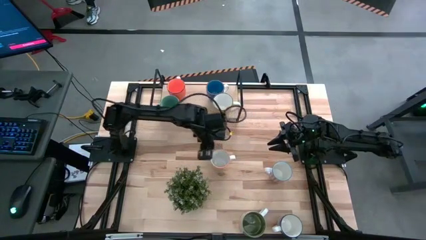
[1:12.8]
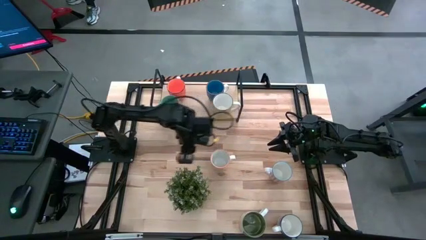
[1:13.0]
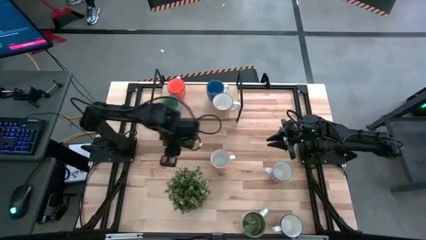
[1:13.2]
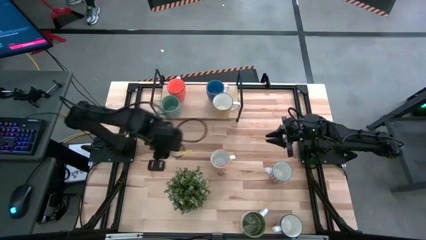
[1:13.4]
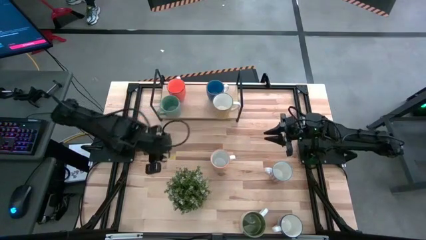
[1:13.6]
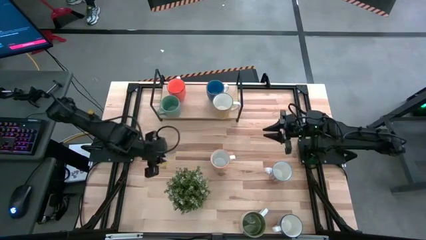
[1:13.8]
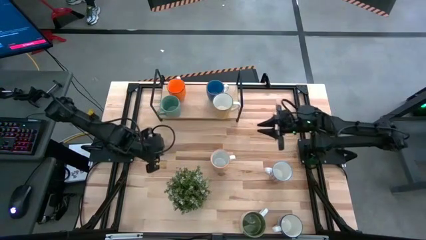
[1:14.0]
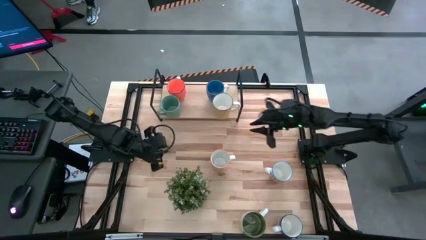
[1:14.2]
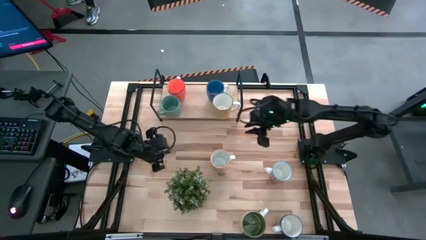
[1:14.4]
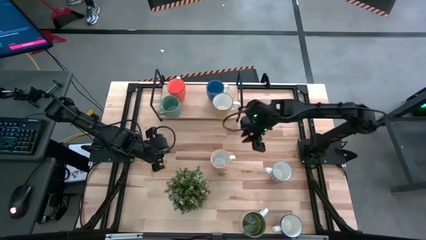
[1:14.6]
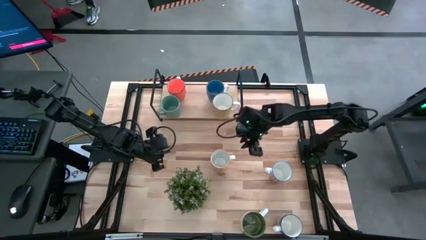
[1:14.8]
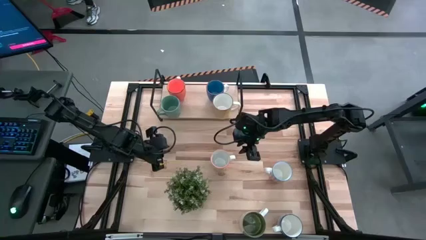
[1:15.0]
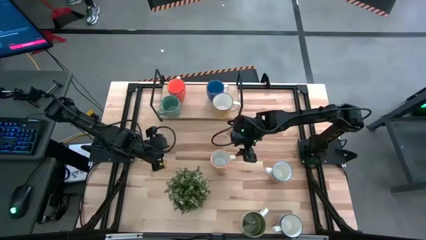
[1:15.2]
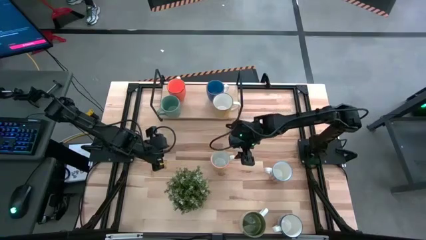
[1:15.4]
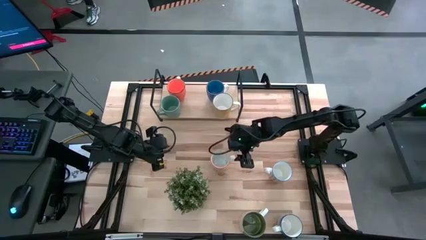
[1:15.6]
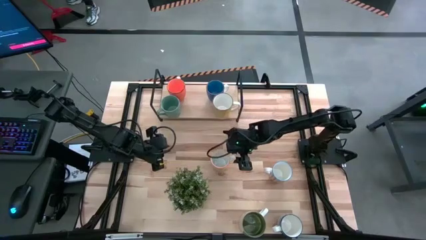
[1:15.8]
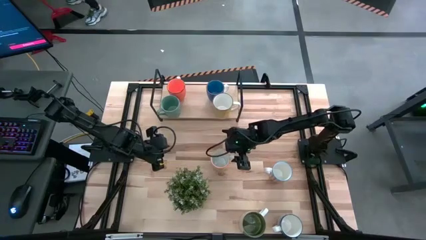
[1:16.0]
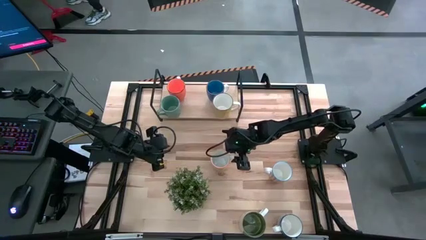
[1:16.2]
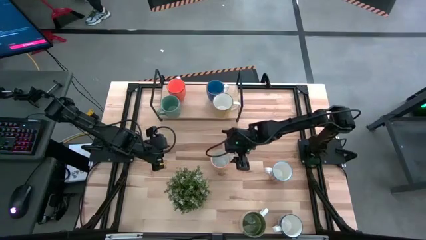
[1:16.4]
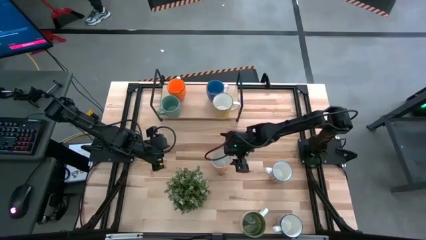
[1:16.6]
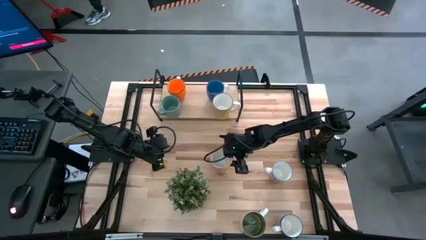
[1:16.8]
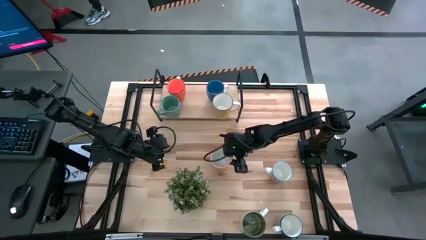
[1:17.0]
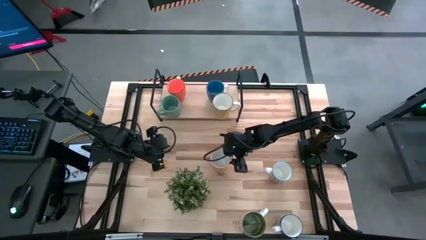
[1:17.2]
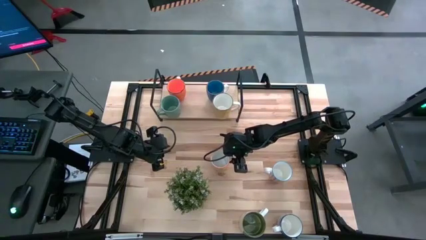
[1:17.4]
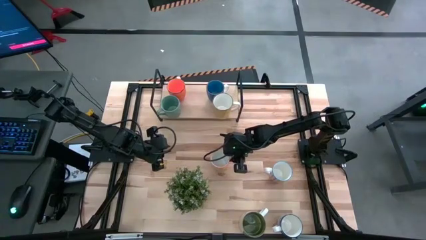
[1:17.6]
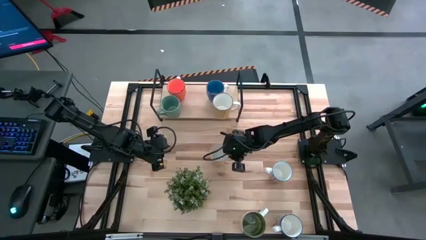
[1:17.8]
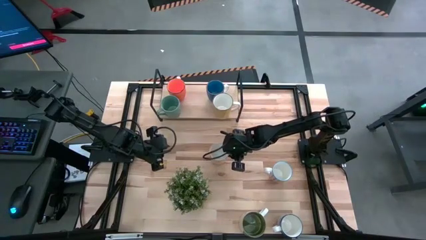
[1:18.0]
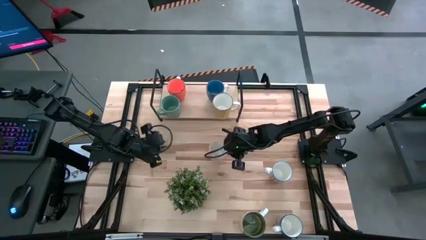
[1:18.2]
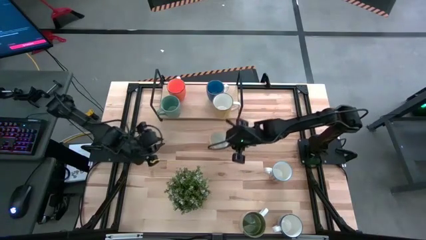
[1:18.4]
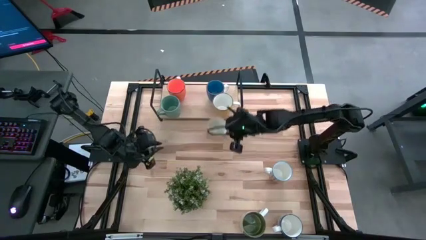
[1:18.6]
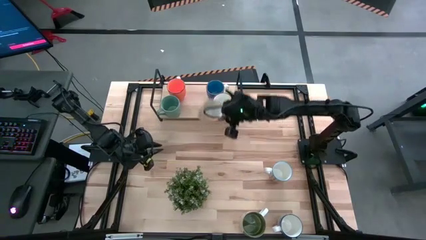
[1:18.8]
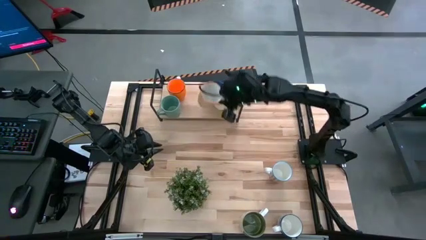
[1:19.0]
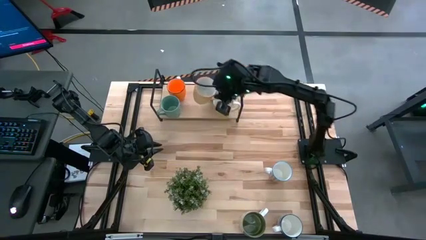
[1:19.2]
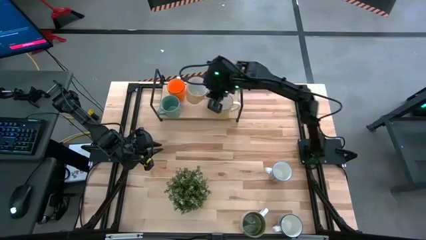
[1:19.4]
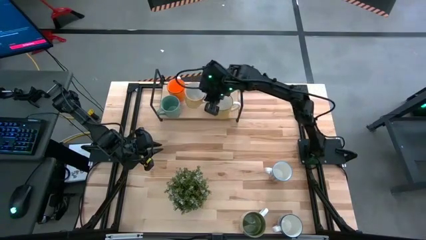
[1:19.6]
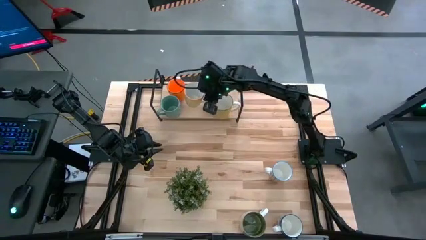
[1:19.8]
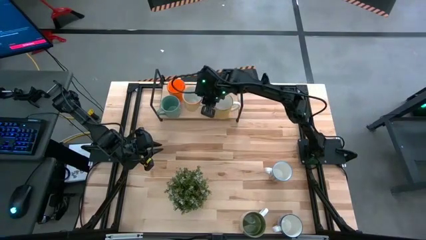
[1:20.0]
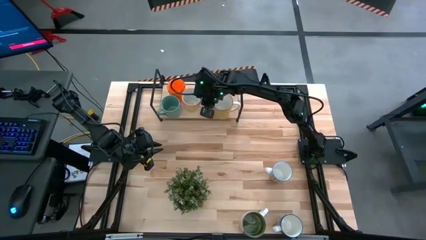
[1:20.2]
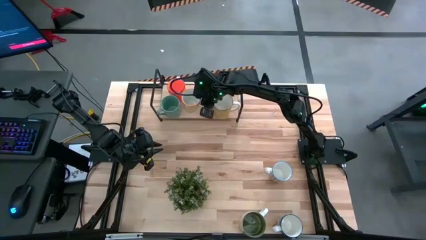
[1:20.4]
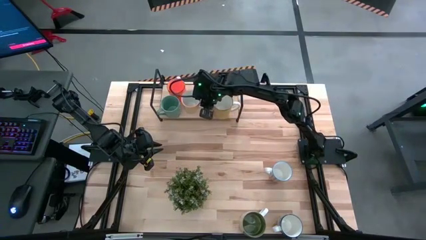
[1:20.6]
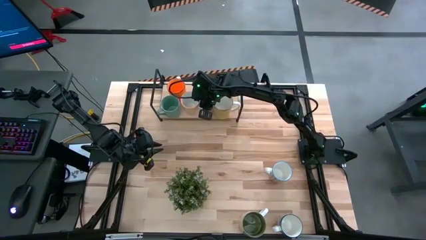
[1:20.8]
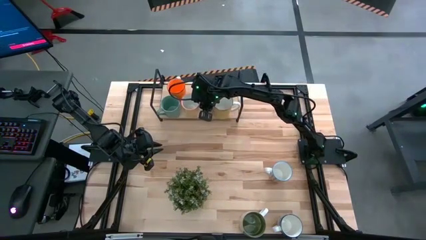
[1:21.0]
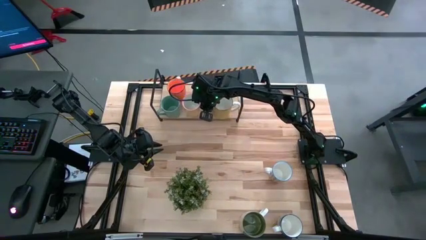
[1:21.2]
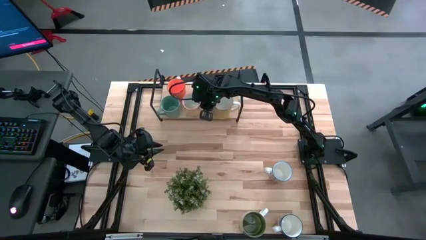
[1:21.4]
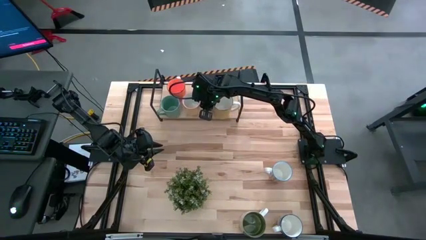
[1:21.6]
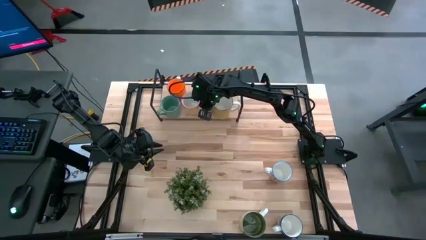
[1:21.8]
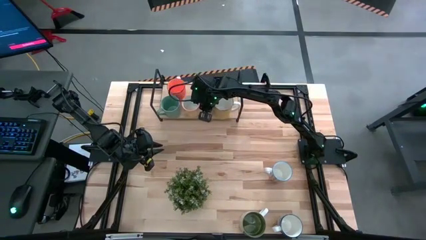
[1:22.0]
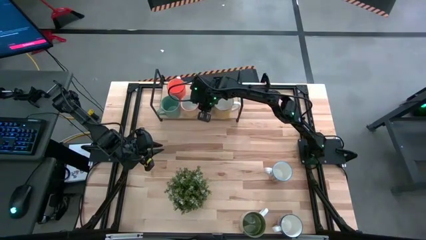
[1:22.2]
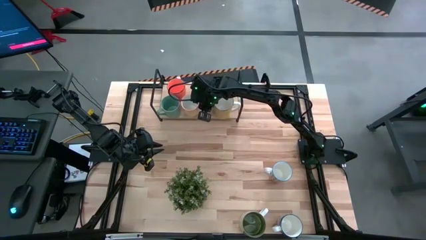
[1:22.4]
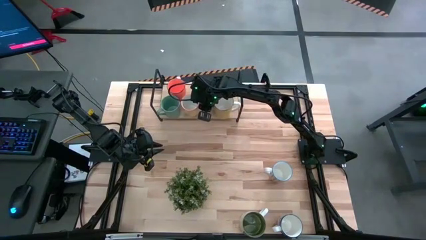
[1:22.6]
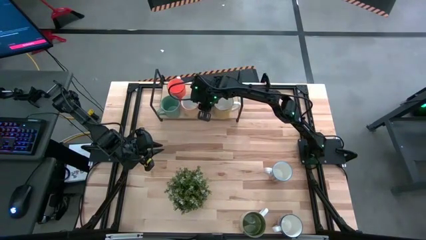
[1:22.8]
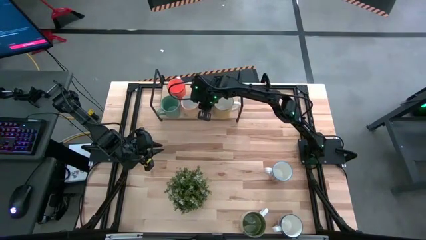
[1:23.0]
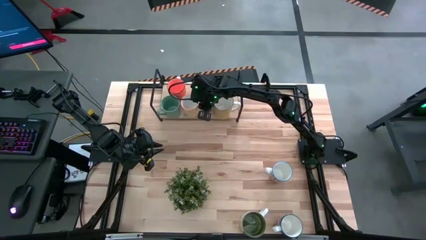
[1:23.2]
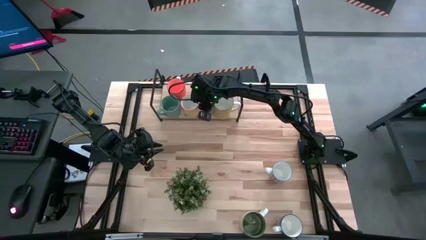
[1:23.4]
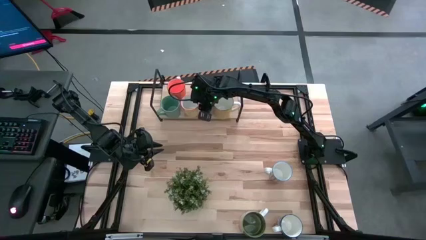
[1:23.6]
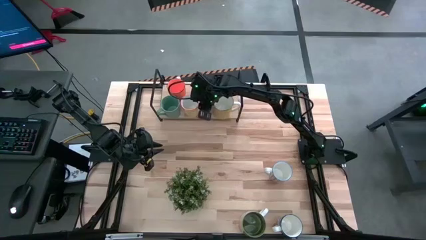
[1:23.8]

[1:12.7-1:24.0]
Task: Place coffee mugs
Put the yellow patterned mug on the shelf
